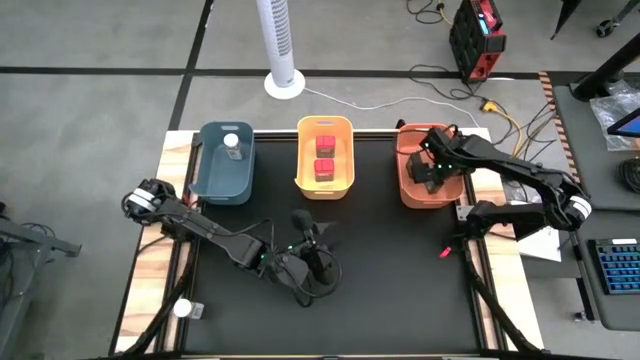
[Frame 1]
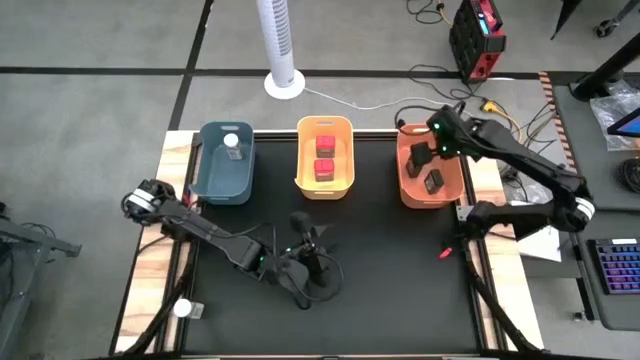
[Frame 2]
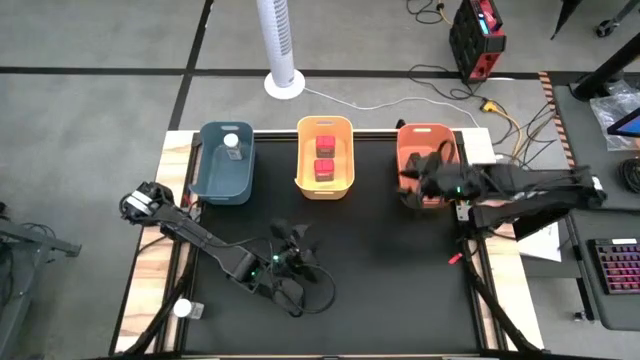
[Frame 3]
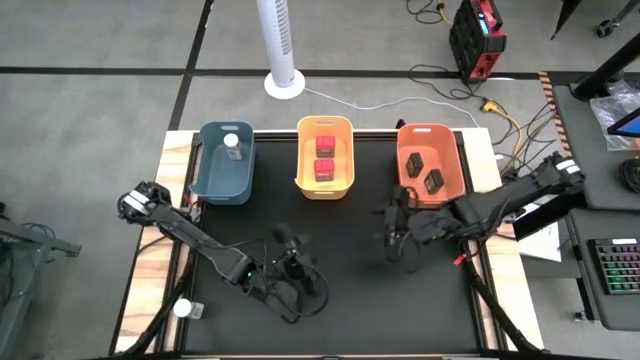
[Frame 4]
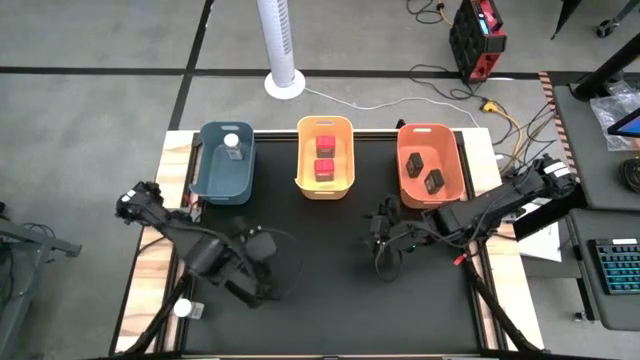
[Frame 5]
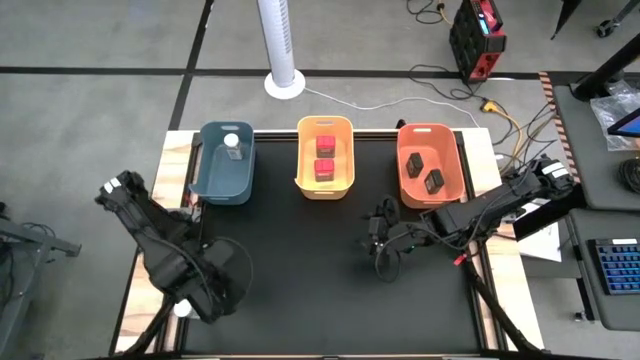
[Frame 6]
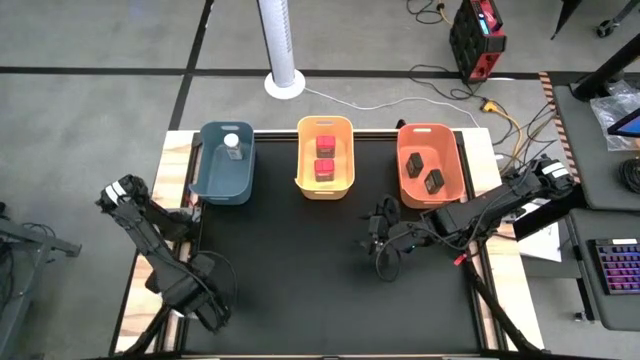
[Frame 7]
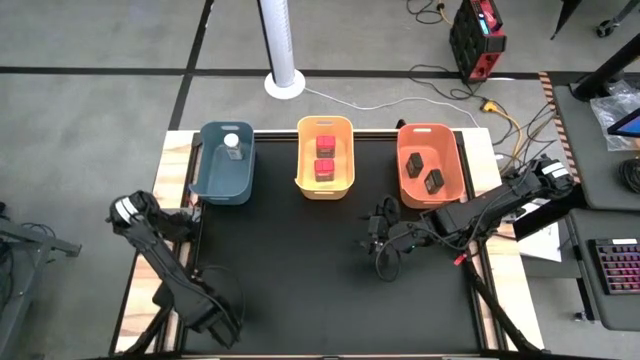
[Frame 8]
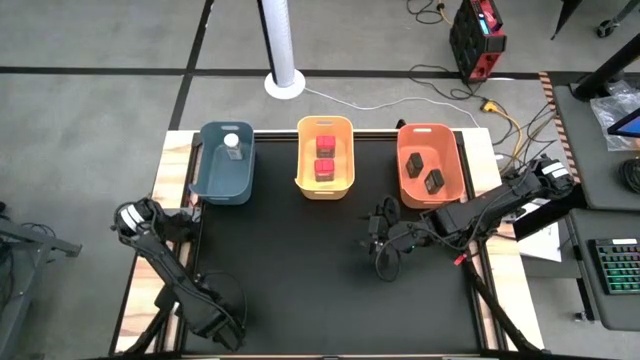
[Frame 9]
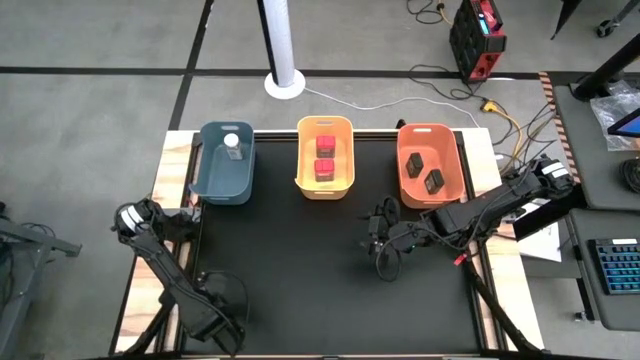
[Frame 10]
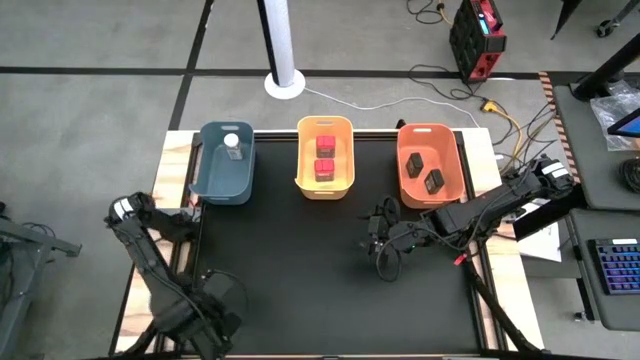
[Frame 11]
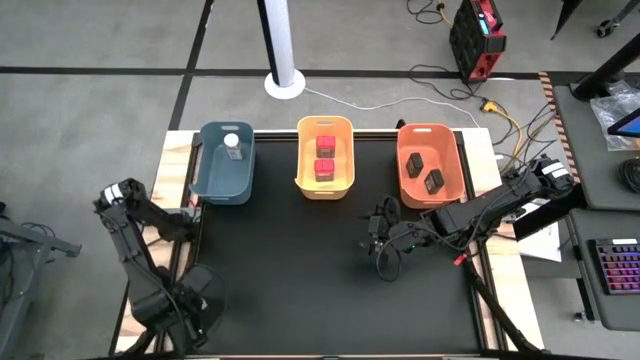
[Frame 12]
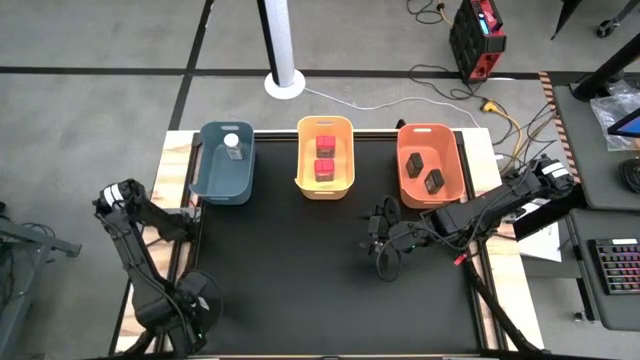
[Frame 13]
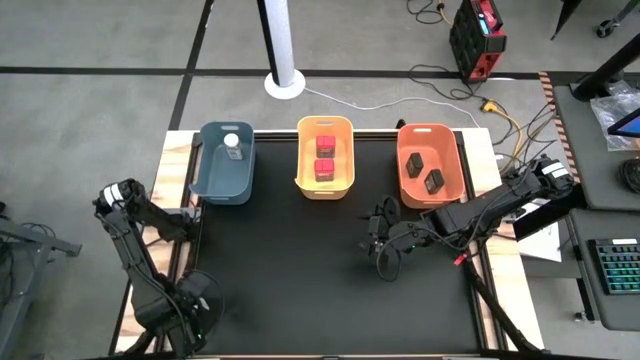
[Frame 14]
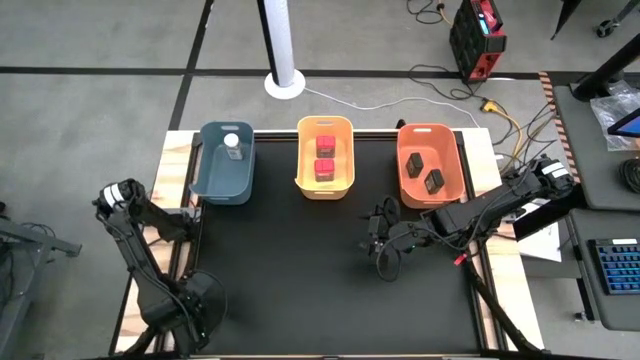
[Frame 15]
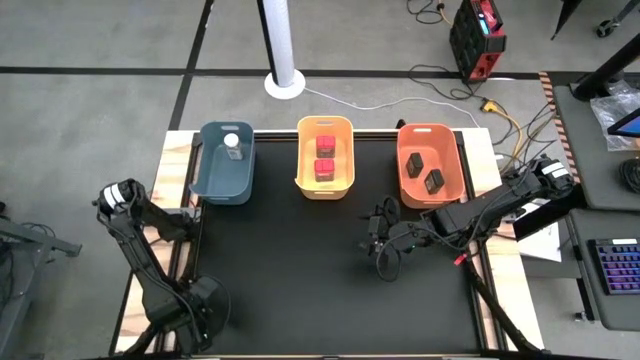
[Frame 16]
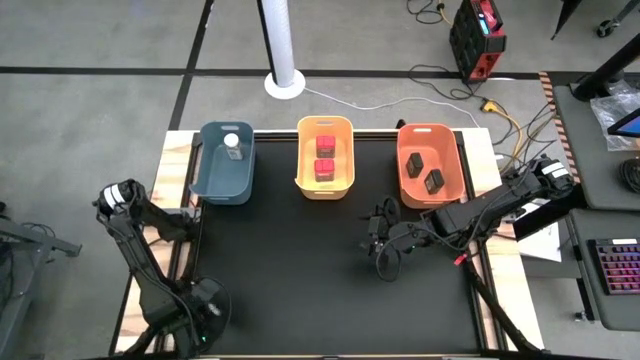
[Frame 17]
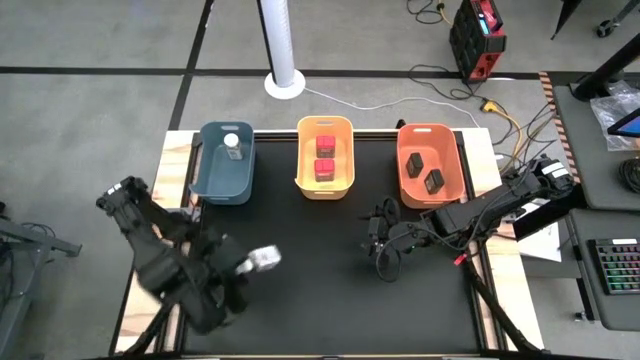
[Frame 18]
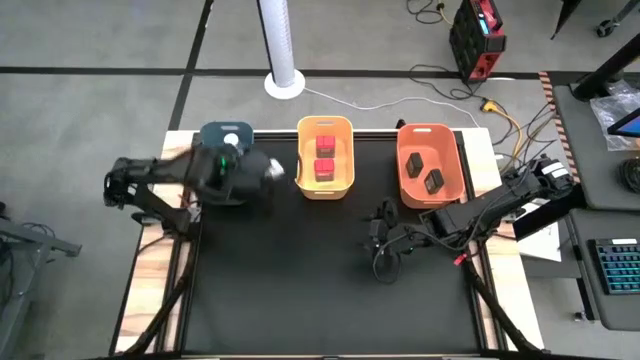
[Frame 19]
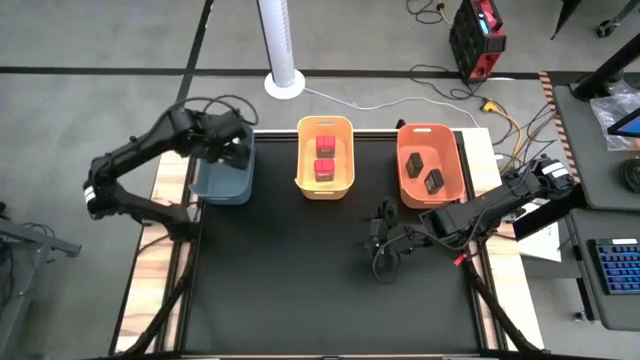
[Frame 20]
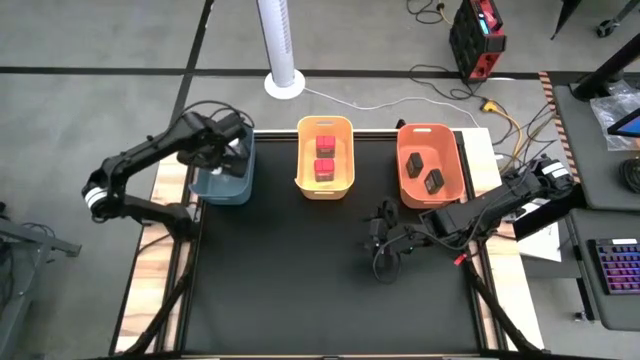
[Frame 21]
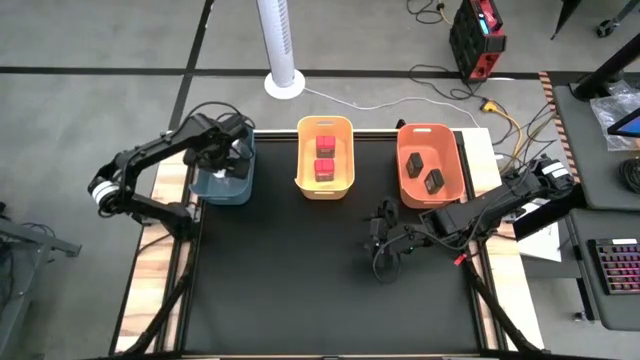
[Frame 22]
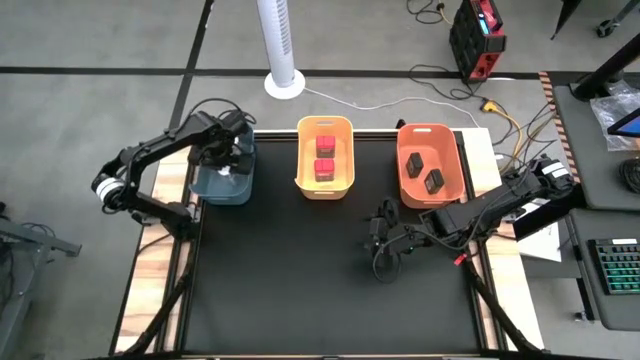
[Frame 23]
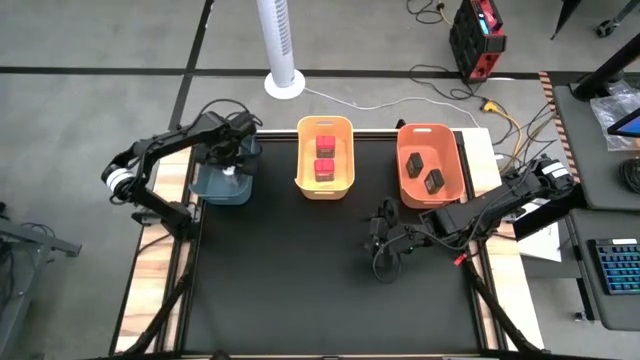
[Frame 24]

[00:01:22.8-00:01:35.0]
Task: Sort spices by type
Put the white seasoning bottle into the gray bin

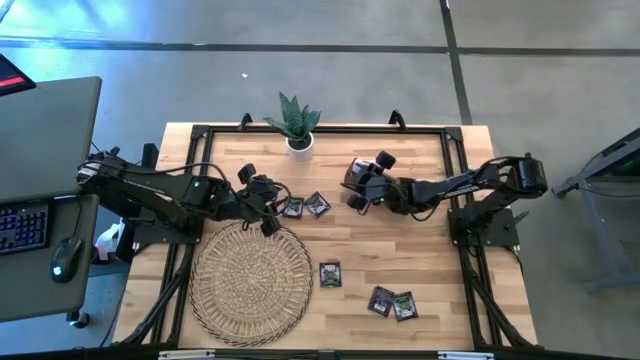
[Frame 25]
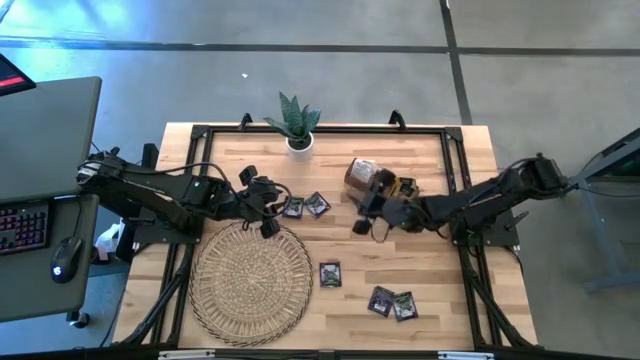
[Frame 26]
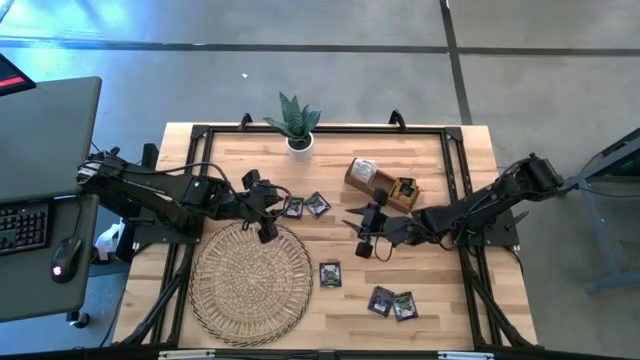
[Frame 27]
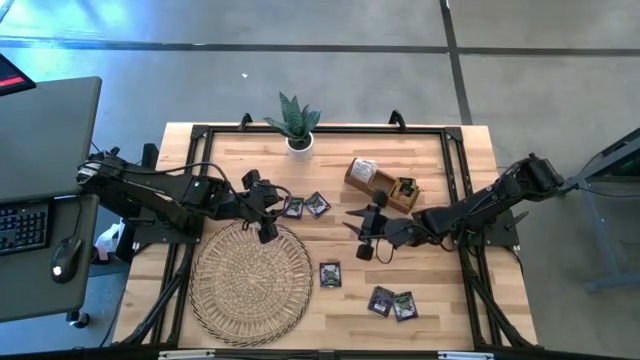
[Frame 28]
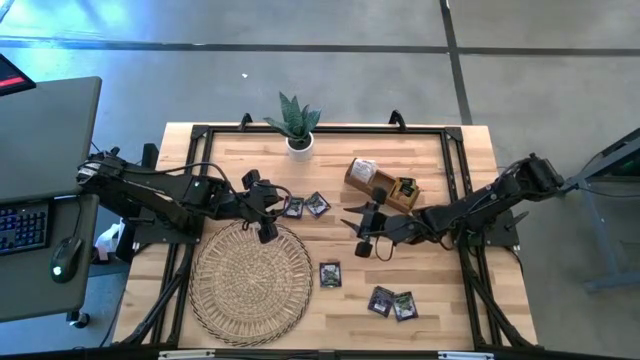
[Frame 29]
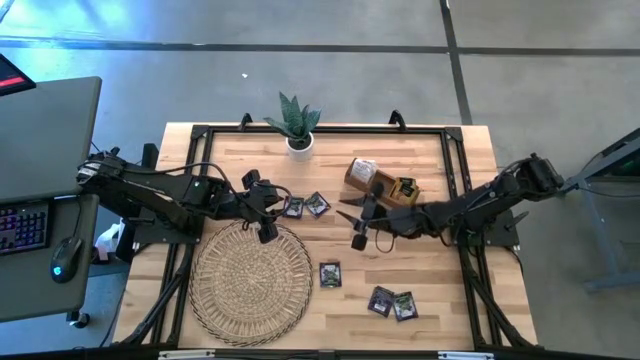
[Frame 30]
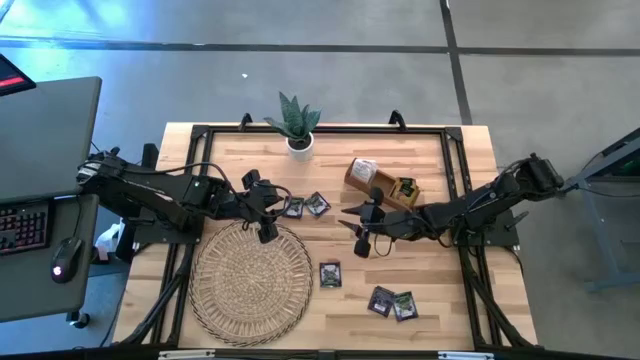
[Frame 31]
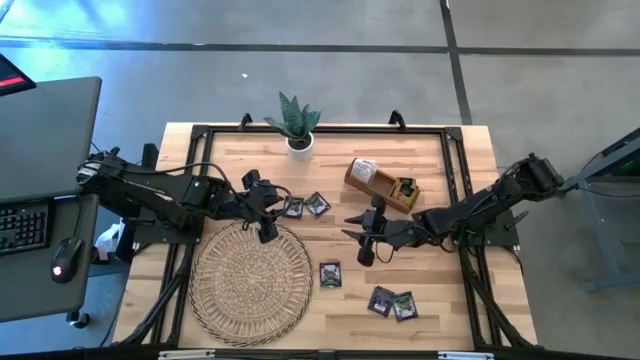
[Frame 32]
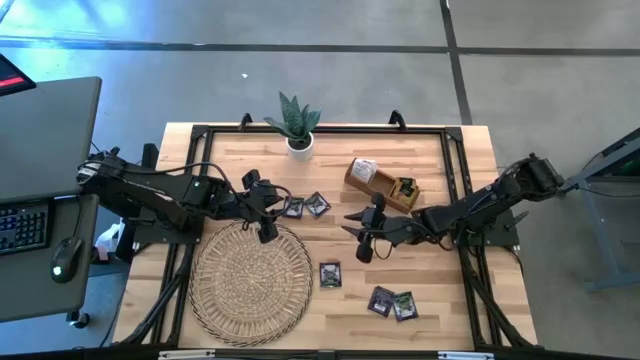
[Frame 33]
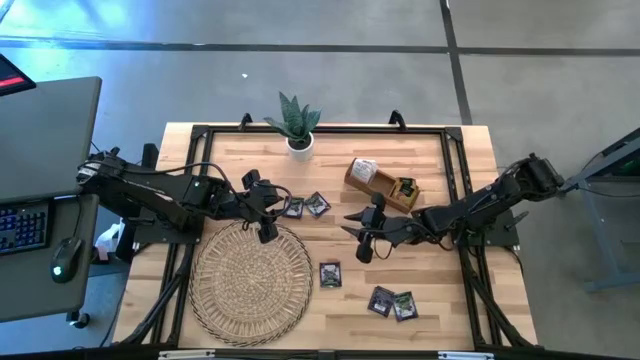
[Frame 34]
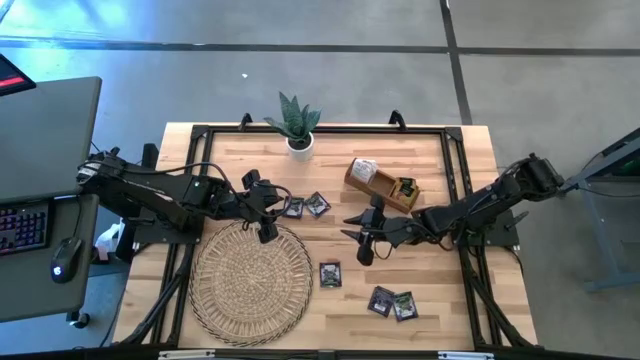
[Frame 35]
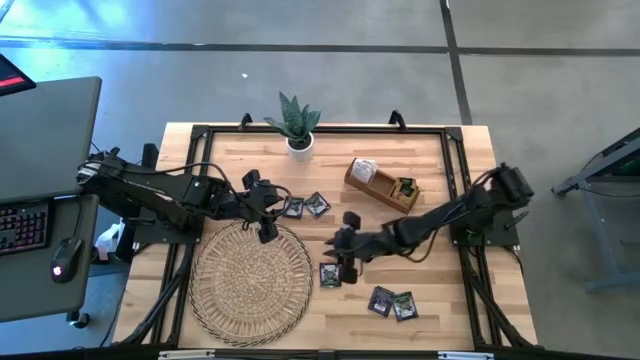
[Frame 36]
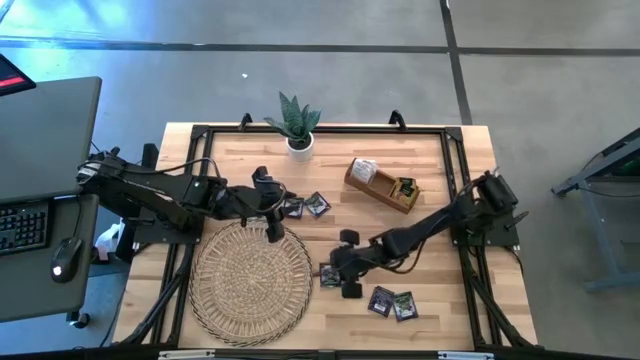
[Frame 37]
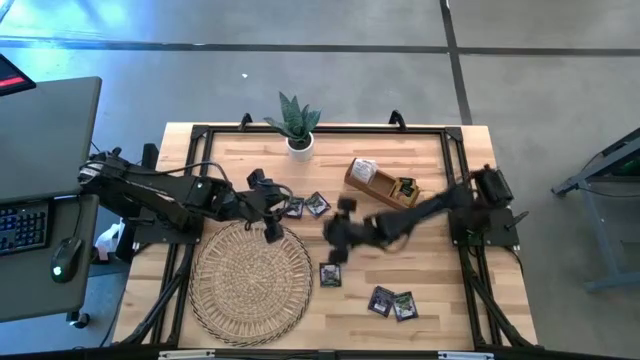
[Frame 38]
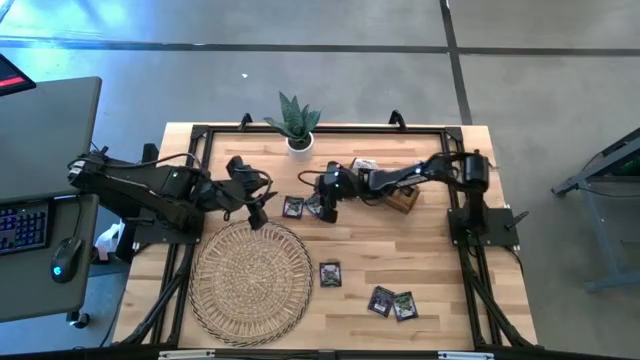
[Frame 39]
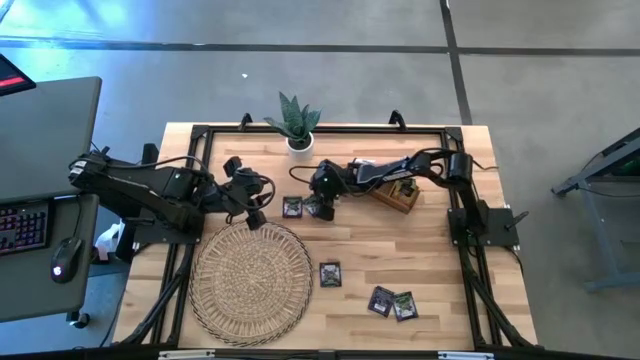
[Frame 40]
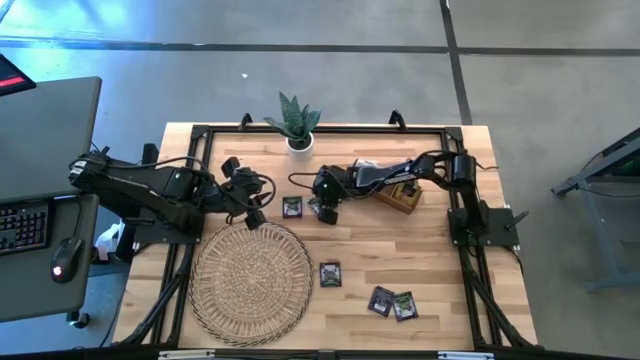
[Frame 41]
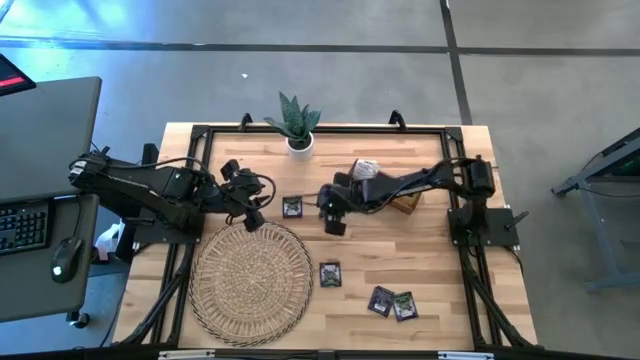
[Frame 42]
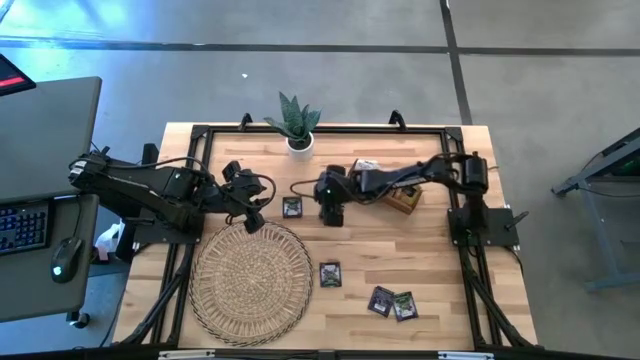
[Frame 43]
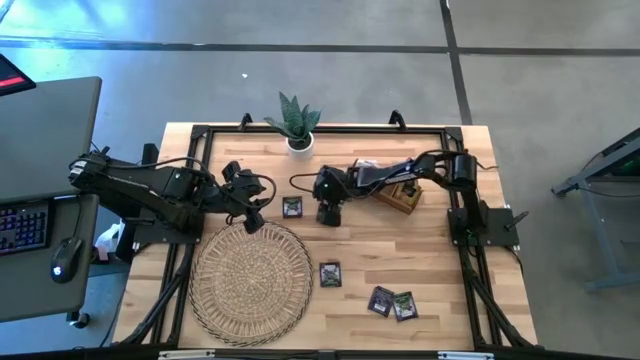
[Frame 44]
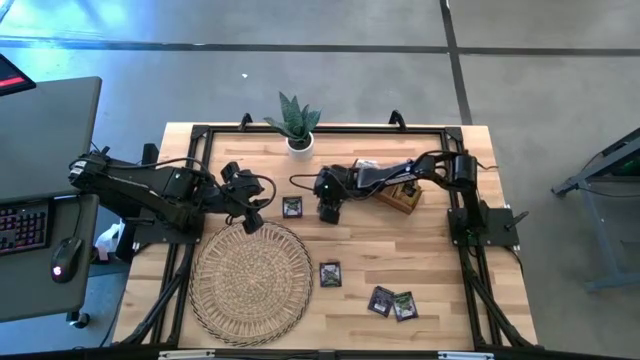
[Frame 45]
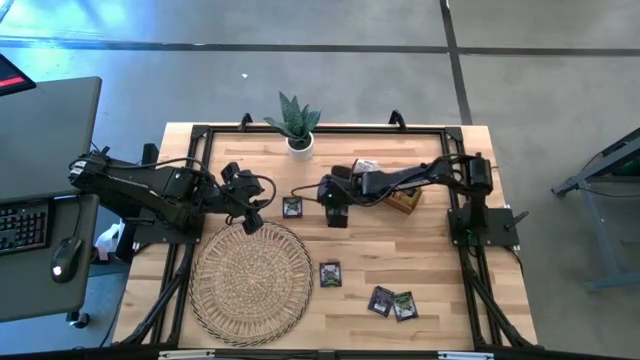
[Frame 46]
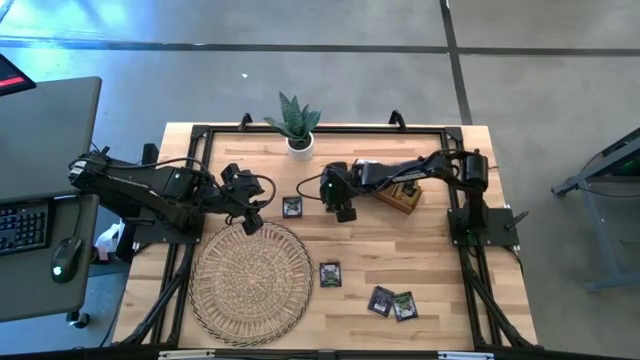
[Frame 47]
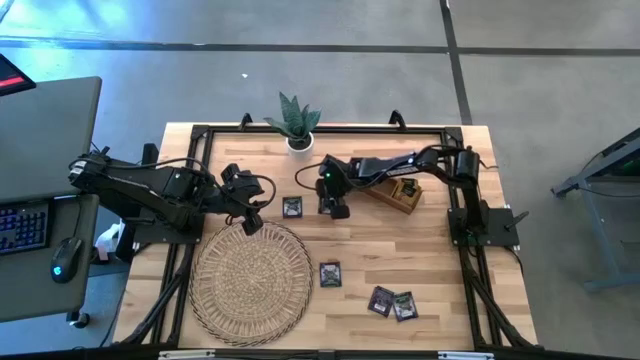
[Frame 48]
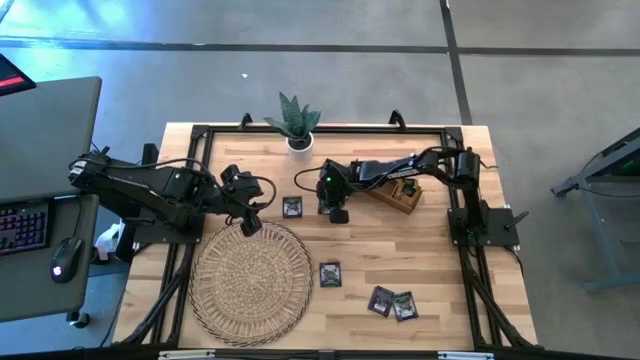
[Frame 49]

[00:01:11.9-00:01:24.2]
Task: Pick & Place Tea
Put the black tea bag into the middle section of the wooden organizer
